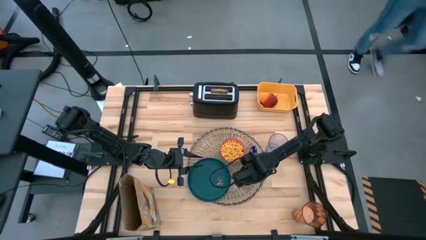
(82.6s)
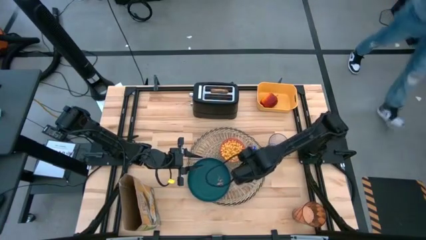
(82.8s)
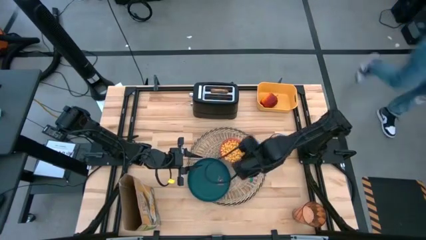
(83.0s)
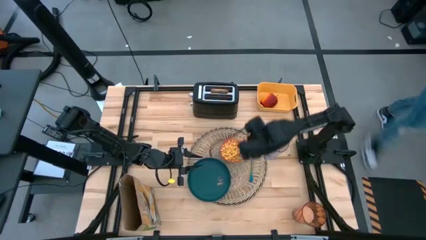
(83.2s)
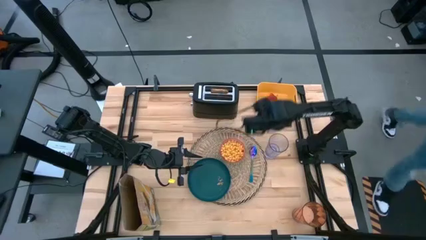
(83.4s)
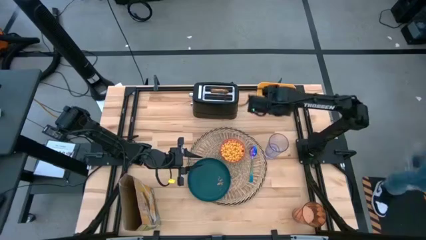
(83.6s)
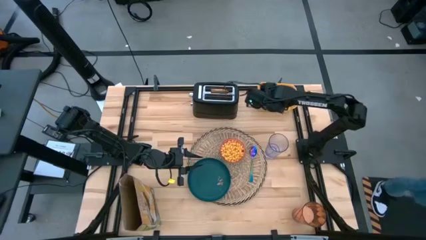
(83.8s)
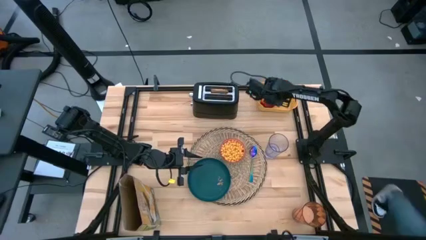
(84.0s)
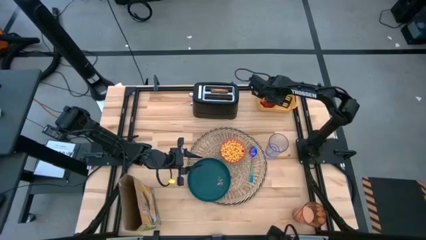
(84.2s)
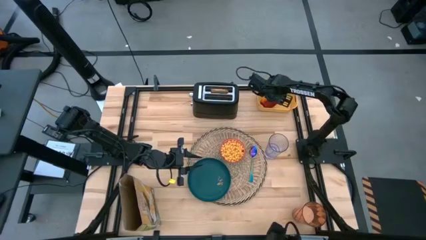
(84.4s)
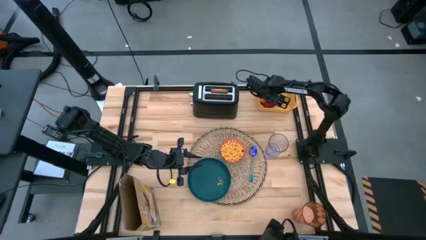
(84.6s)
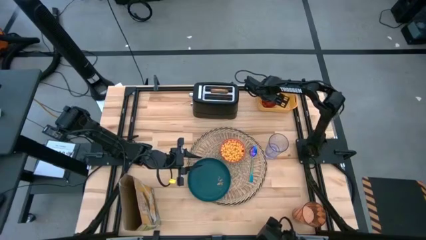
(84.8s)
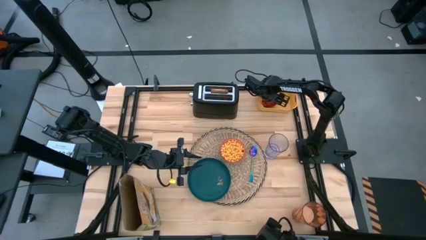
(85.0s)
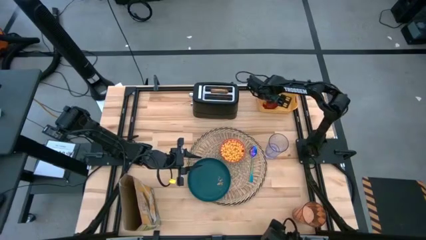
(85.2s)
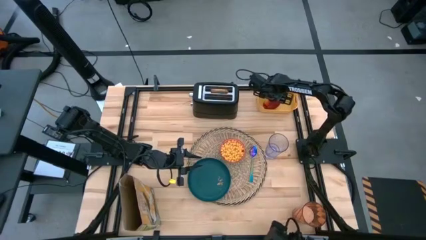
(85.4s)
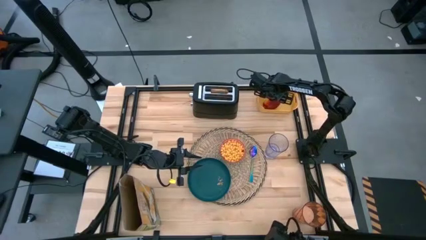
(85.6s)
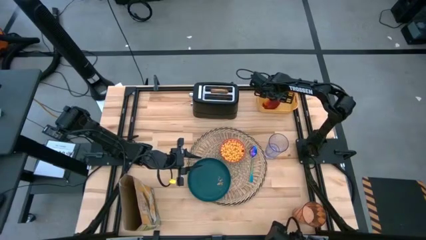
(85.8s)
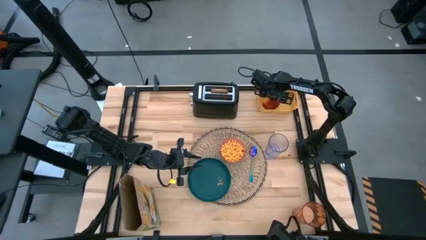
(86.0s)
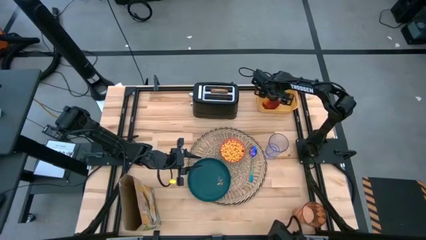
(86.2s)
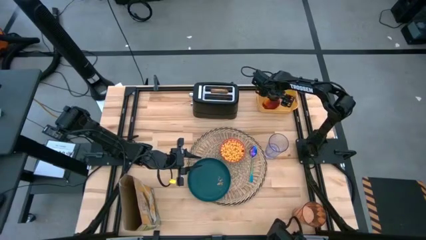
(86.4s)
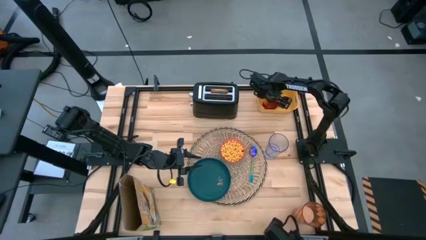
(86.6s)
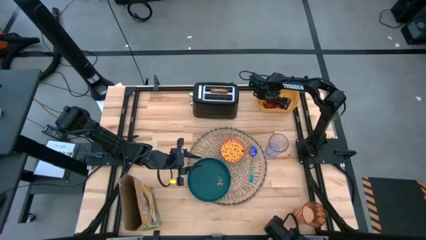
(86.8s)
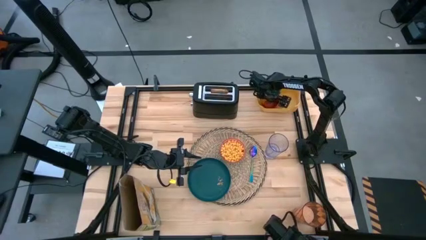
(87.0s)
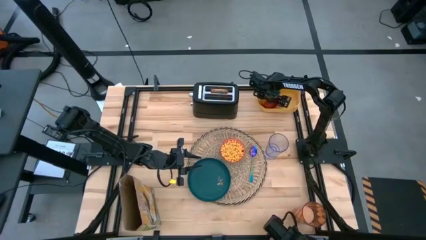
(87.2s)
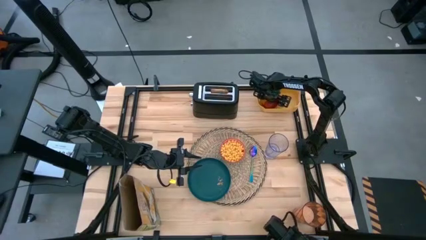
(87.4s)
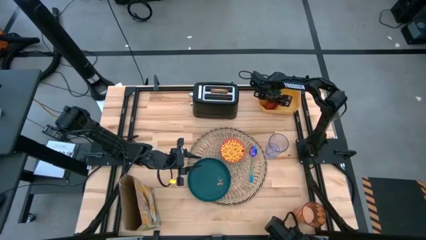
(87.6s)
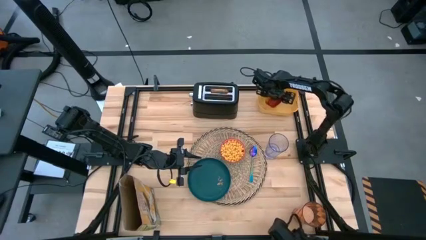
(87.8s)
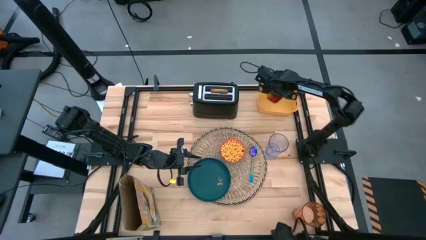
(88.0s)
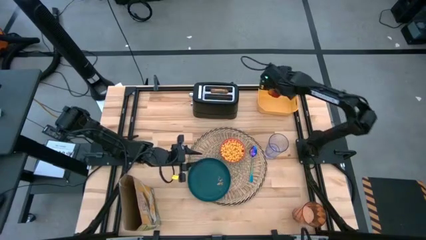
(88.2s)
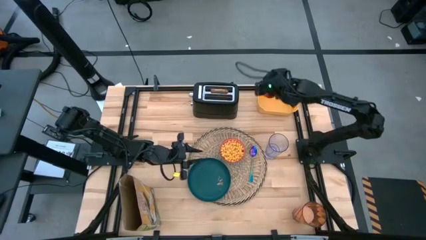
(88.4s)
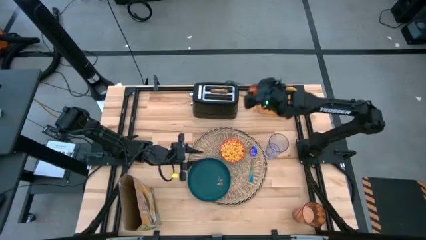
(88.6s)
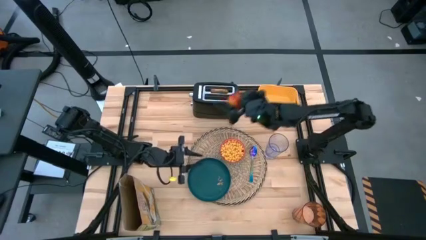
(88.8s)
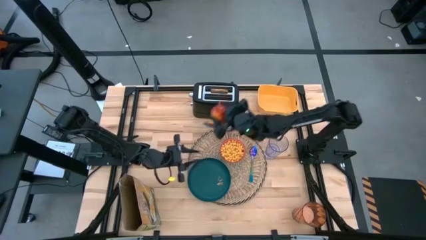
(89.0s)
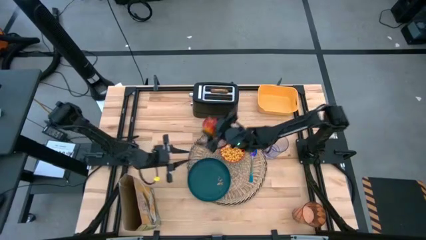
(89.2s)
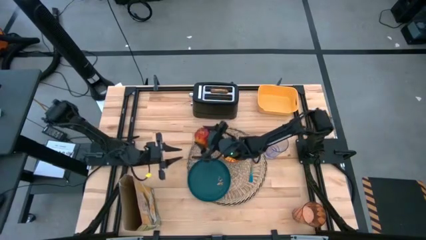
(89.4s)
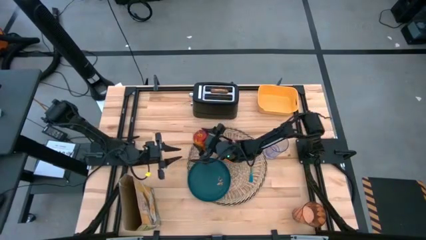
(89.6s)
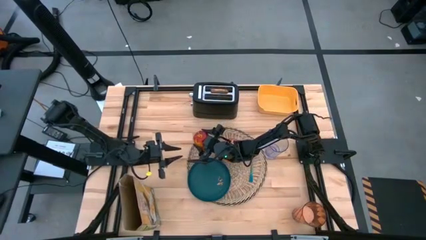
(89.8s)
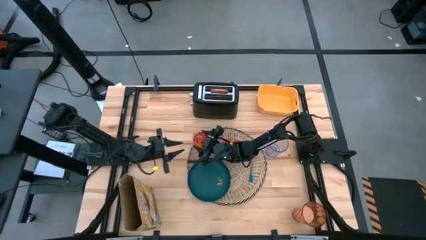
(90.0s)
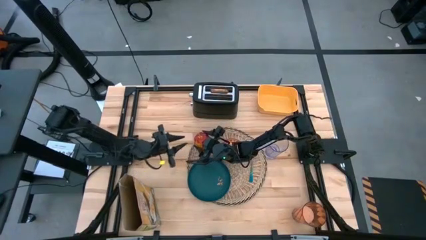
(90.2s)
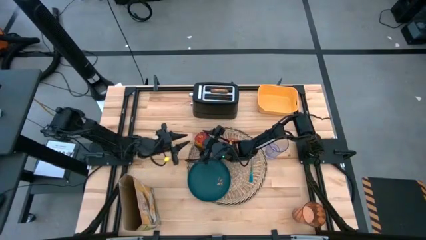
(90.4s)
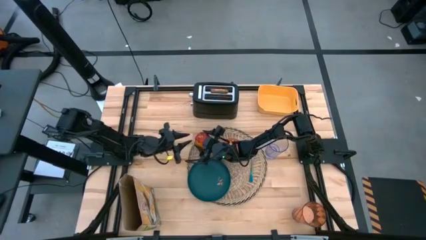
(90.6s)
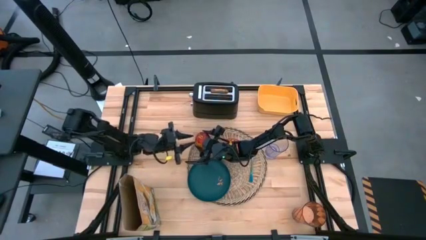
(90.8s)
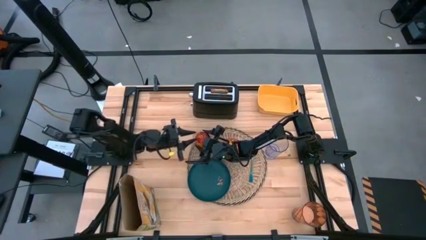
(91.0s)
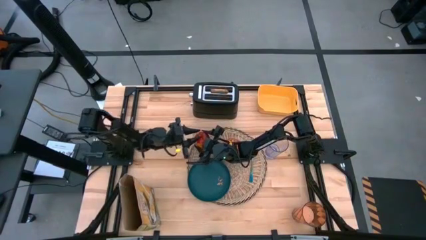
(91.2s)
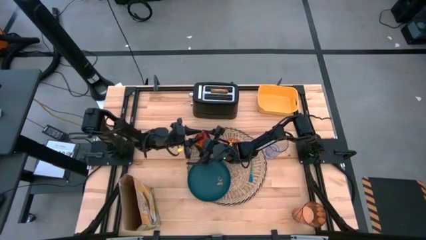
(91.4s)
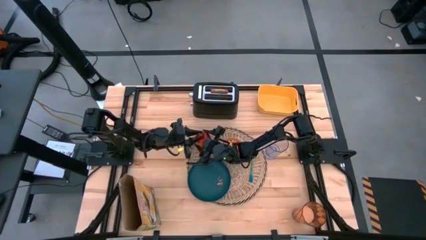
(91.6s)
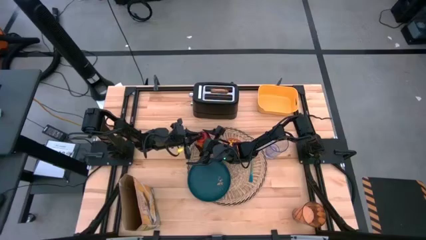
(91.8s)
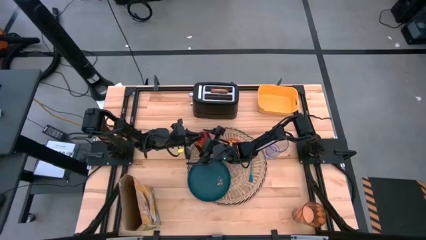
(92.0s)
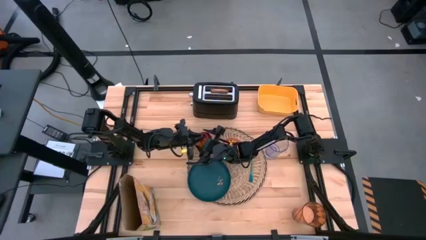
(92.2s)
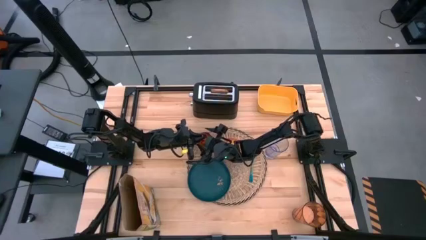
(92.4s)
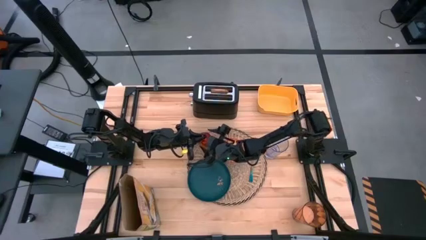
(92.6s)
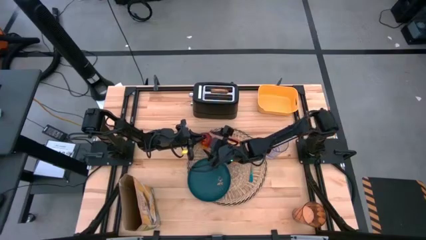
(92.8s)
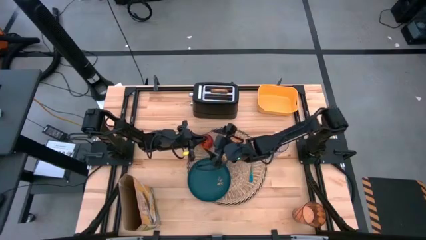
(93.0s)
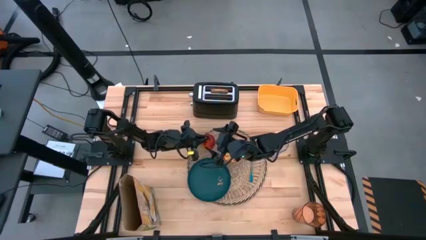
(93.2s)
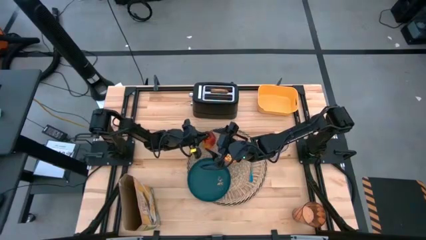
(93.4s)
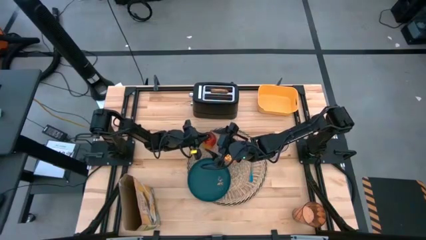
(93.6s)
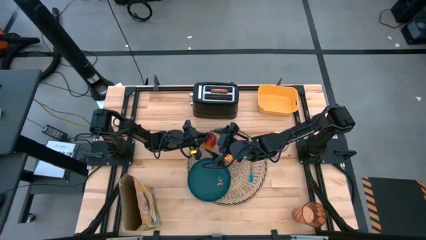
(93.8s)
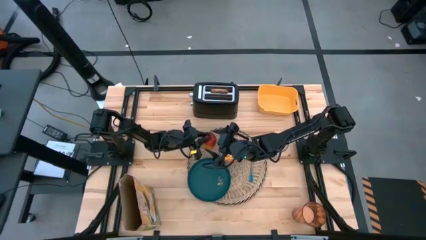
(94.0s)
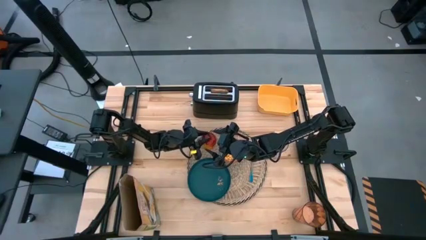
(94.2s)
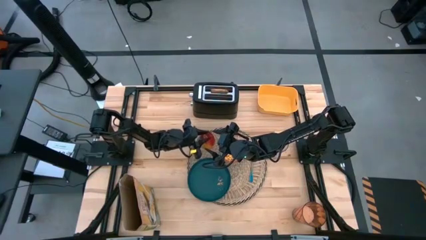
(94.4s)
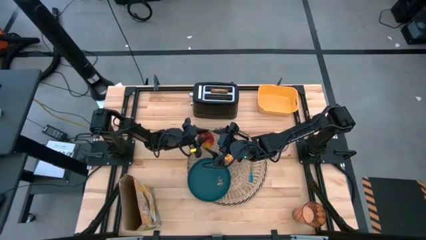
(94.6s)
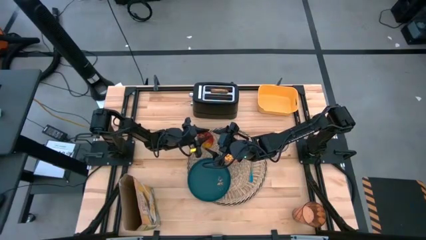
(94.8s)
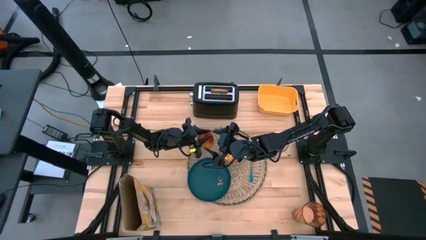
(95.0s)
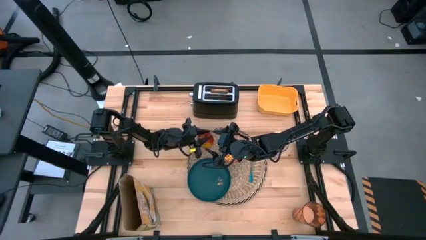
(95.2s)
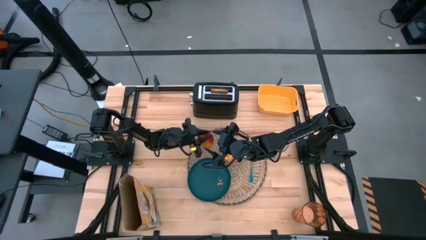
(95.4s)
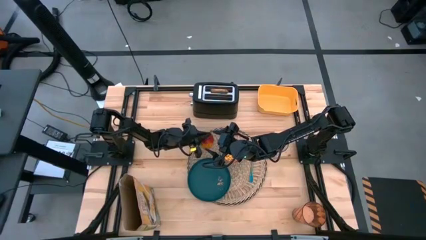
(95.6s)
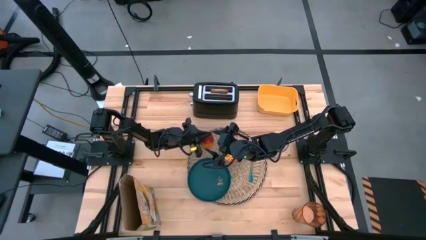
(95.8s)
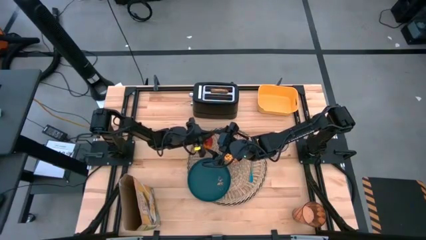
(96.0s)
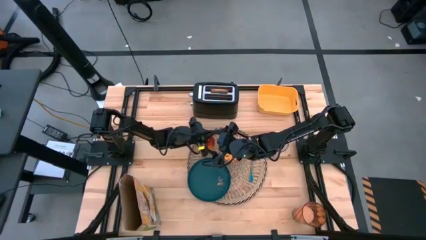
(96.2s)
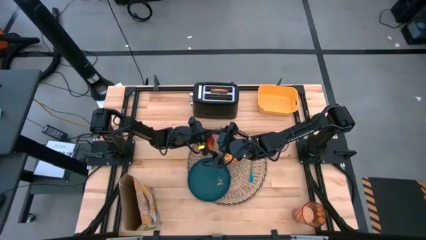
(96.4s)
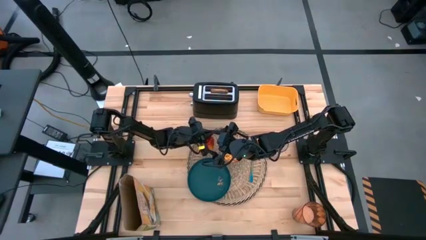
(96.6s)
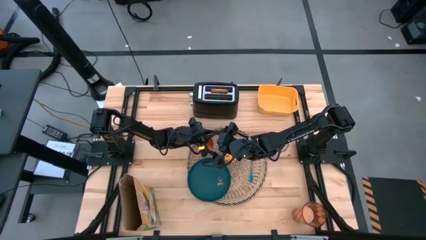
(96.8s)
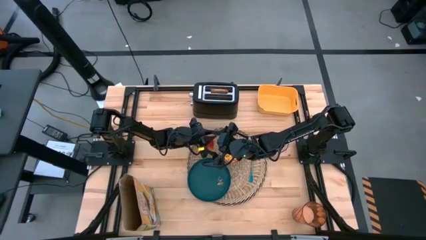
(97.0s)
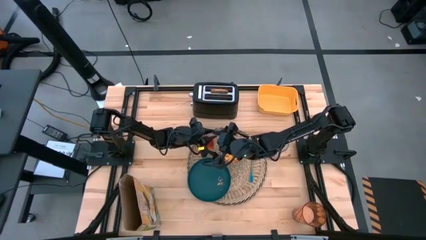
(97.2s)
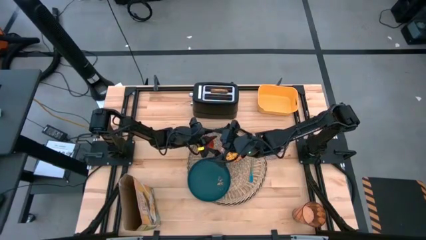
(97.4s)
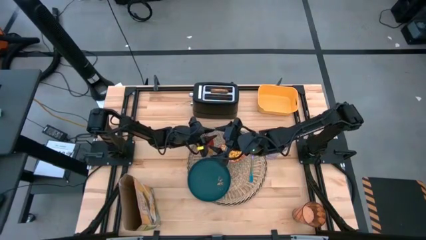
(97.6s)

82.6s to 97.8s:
Task: Arrange a breakfast setting
Put the apple on the brown table mat to the top of the dark green plate

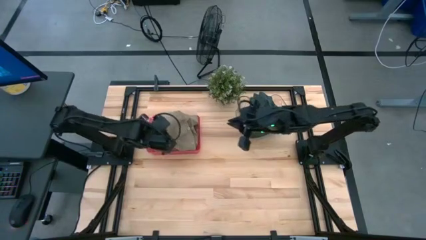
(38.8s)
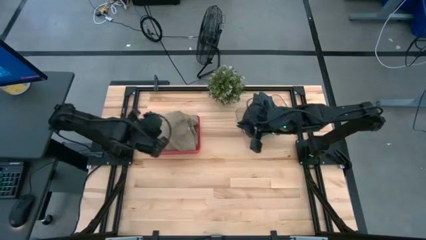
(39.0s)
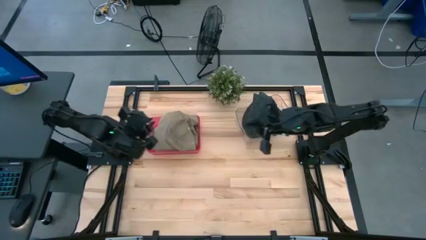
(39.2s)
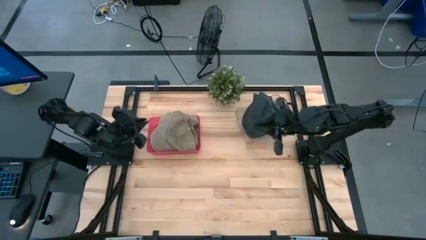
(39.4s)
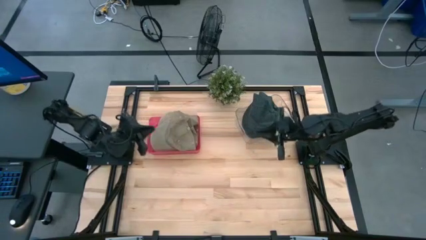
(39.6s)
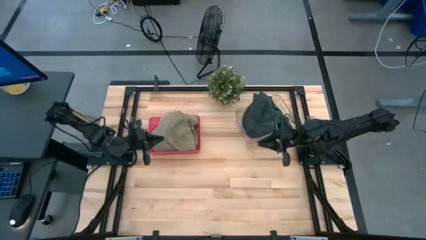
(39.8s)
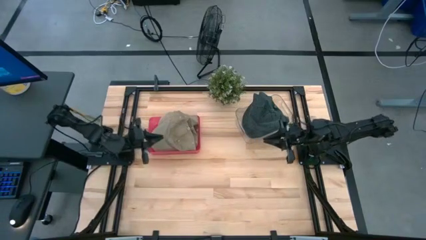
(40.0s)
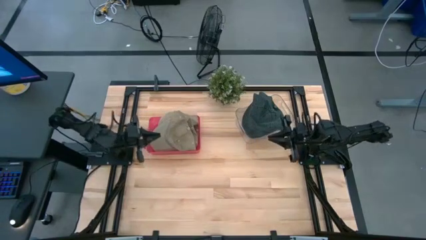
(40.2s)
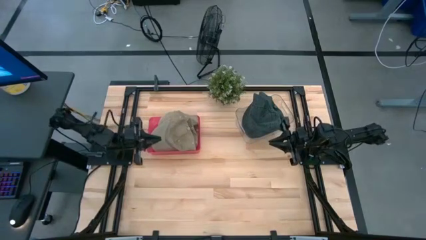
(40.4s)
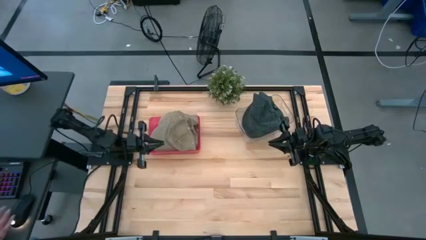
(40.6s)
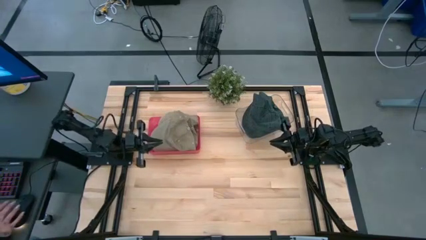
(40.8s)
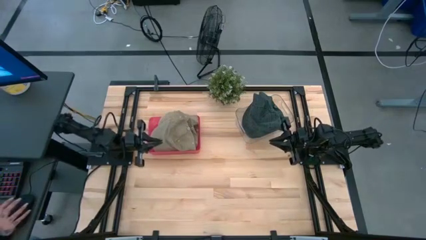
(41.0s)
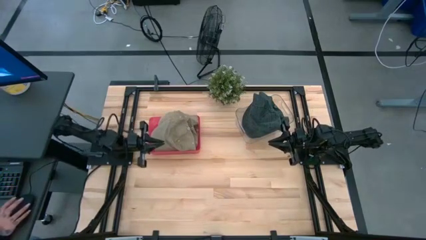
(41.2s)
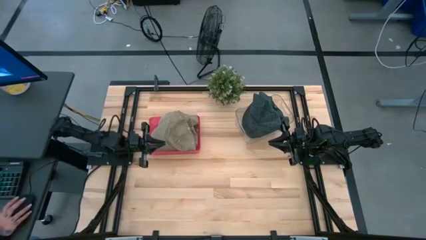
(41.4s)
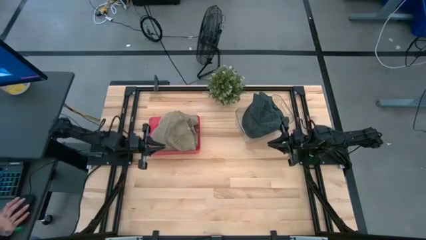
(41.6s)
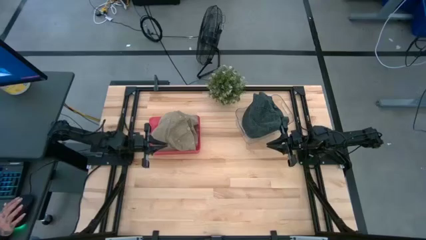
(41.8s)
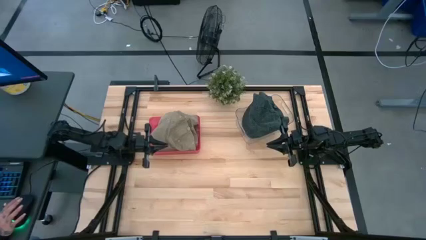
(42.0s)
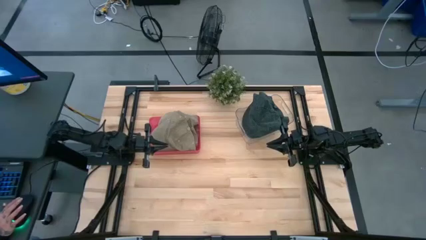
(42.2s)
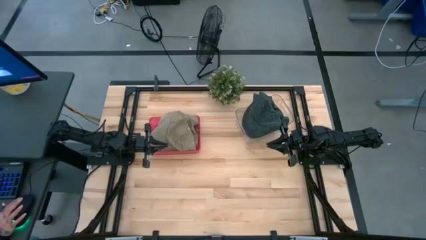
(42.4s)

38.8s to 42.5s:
Task: Pick & Place hat
Return to Home Position
